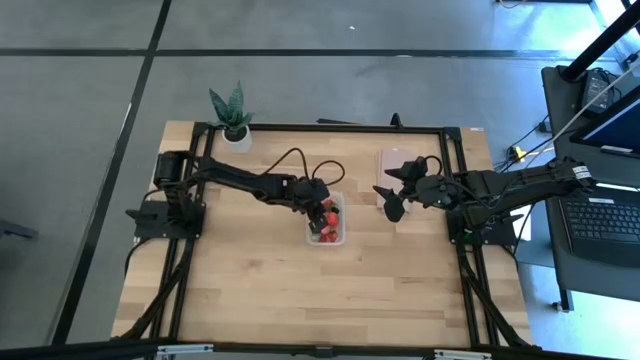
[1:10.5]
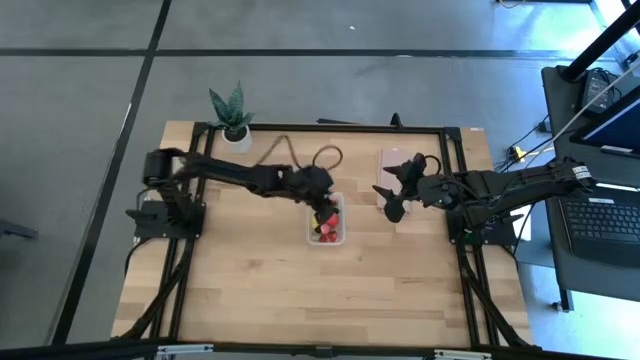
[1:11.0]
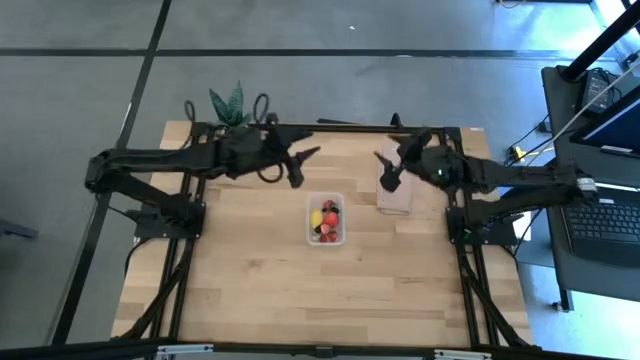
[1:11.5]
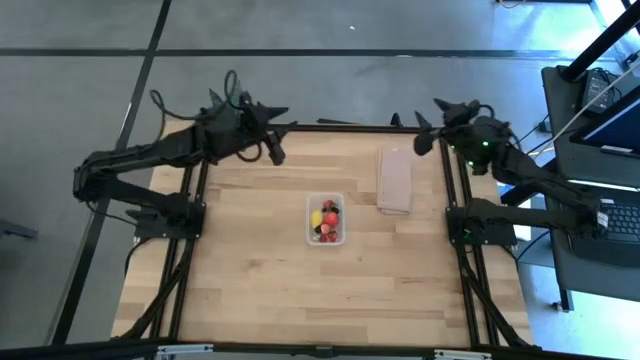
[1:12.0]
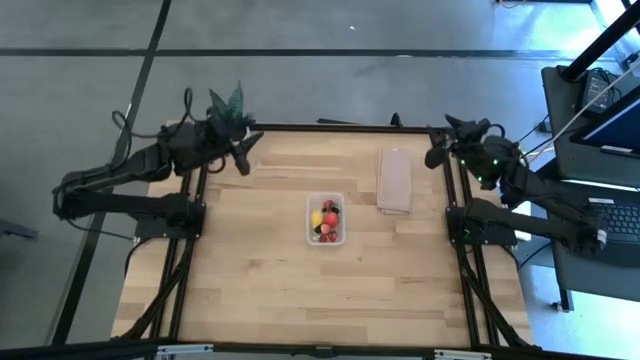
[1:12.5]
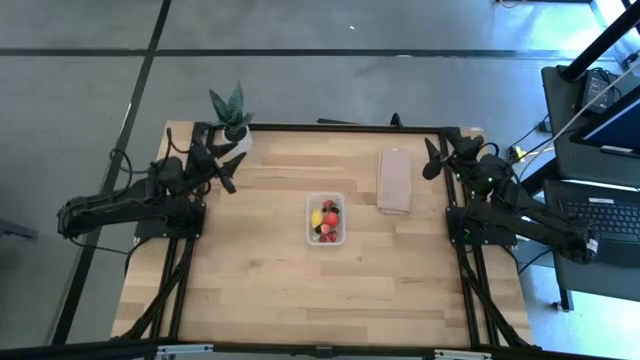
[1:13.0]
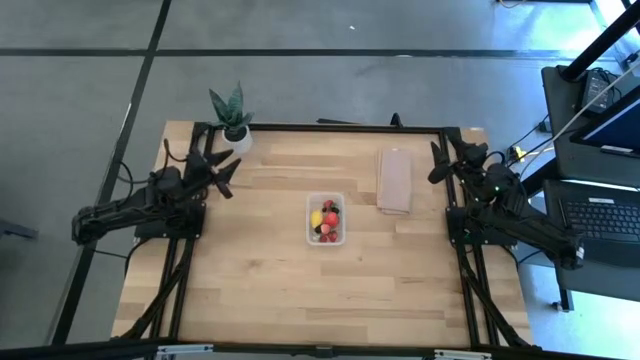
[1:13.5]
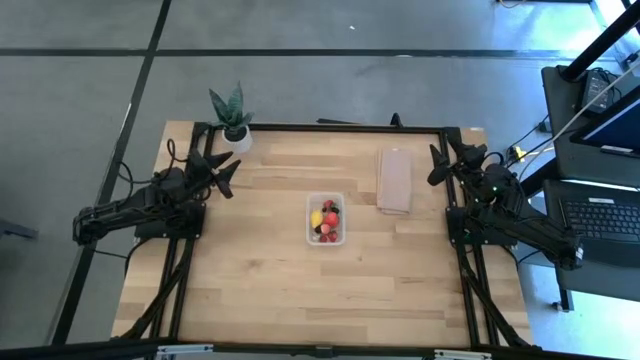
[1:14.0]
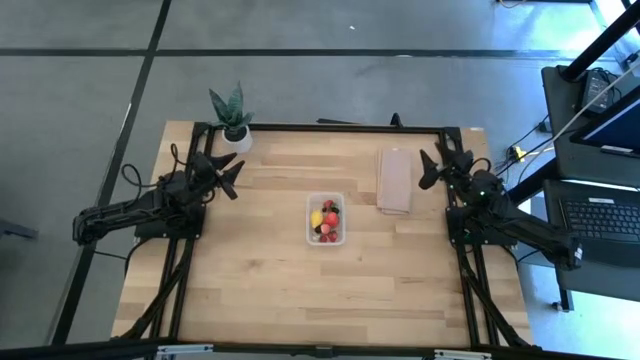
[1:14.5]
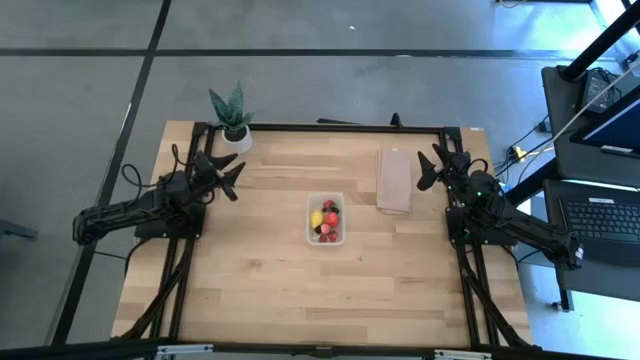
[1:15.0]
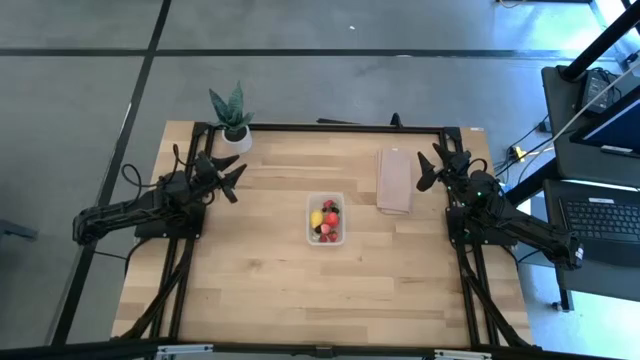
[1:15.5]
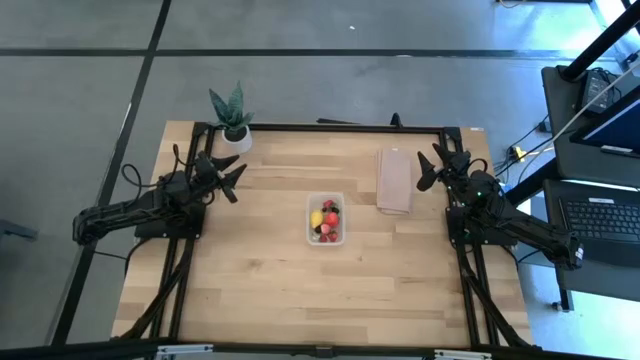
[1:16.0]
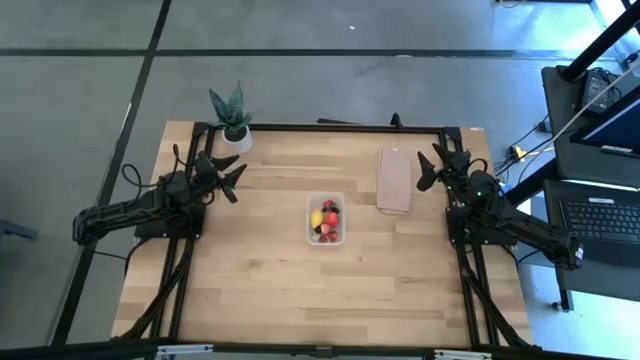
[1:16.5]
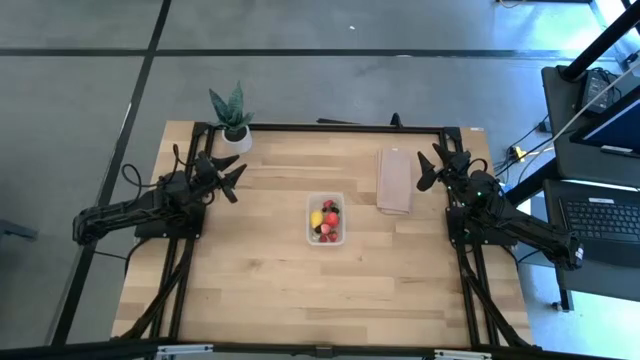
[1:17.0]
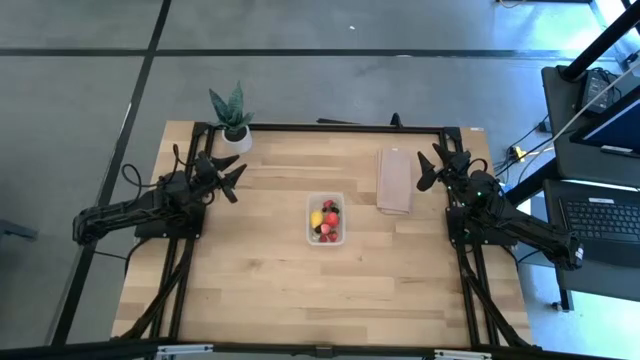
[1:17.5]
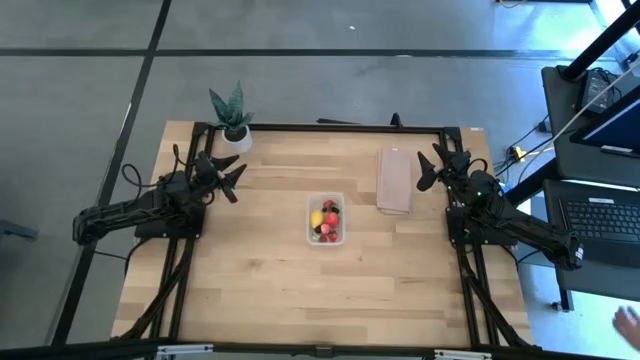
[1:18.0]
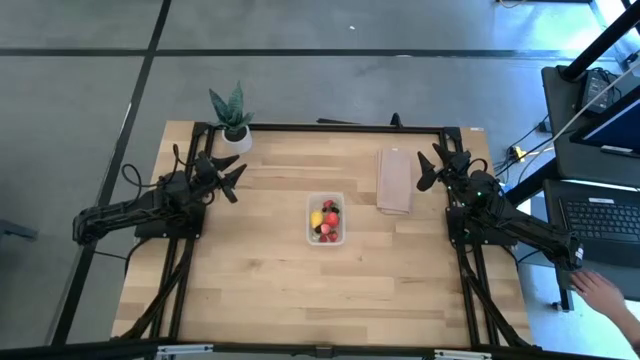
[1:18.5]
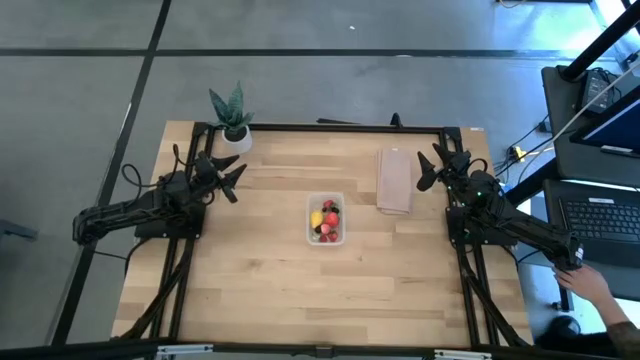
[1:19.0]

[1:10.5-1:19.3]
Task: Pick and placing Produce into tupperware
Return to Home Position

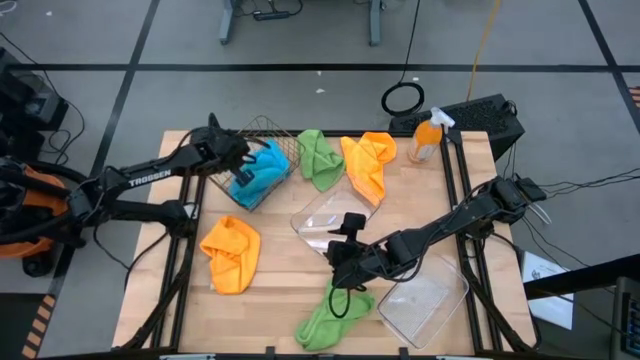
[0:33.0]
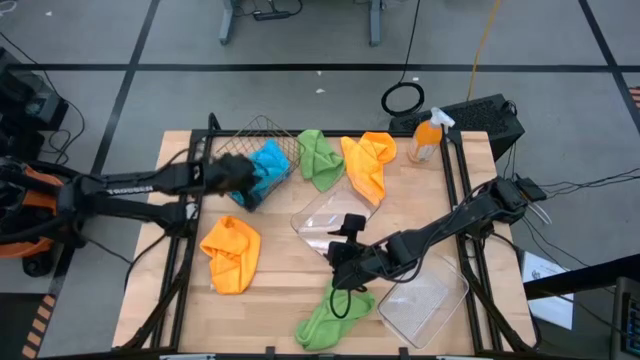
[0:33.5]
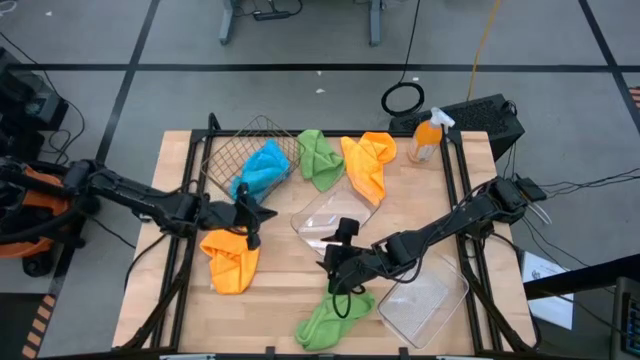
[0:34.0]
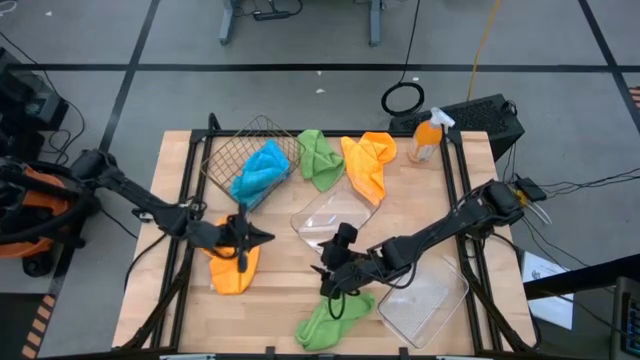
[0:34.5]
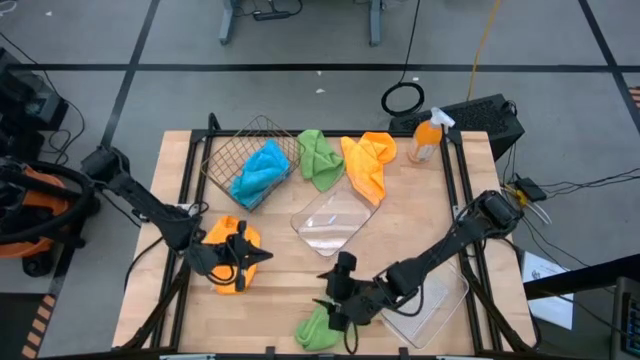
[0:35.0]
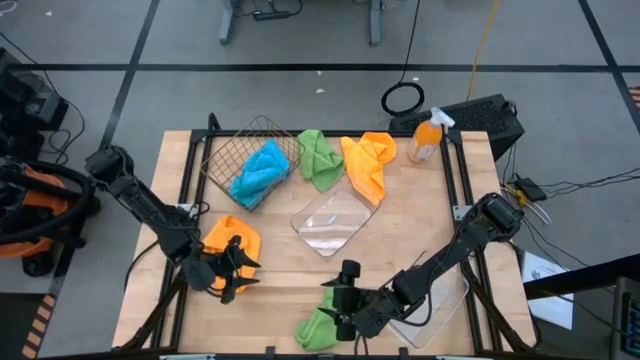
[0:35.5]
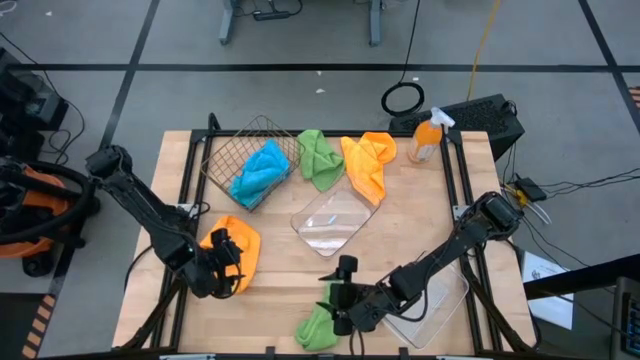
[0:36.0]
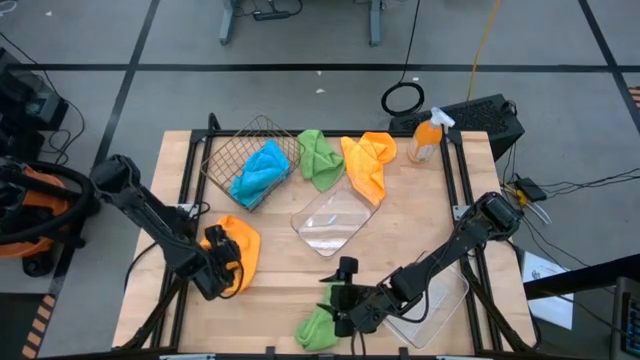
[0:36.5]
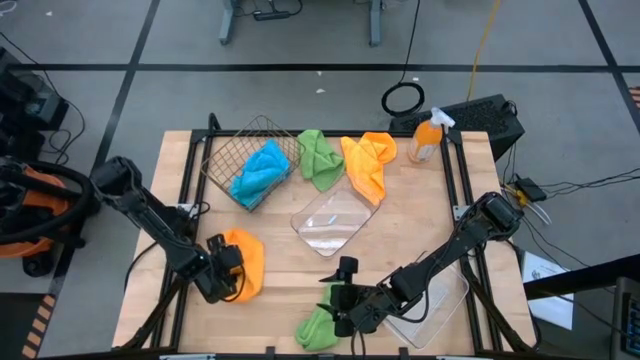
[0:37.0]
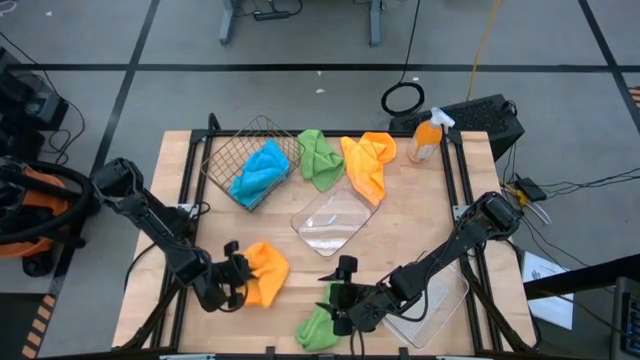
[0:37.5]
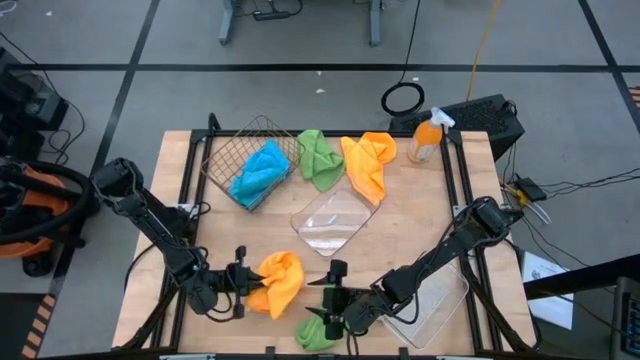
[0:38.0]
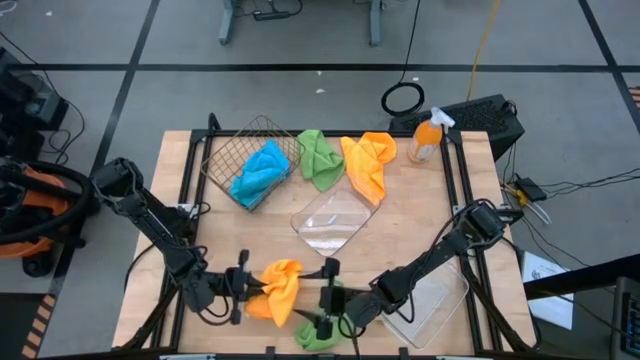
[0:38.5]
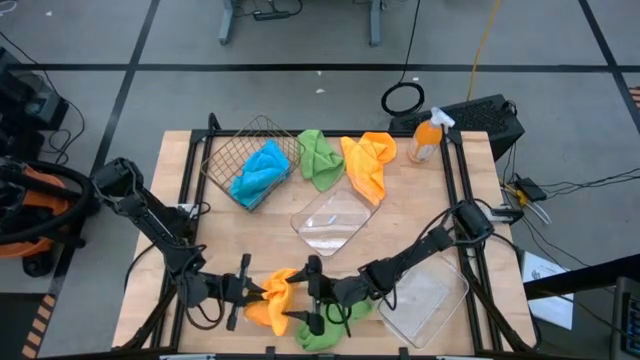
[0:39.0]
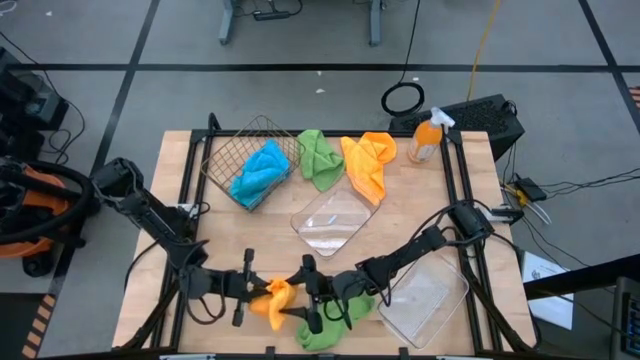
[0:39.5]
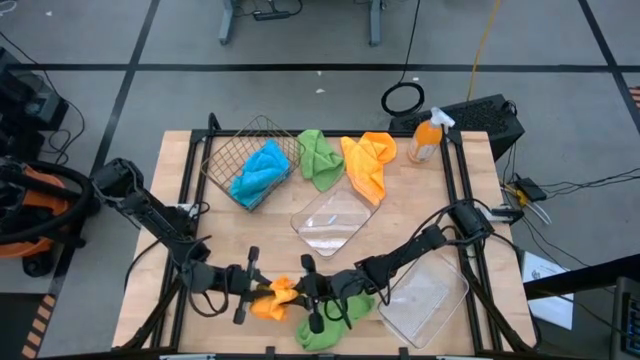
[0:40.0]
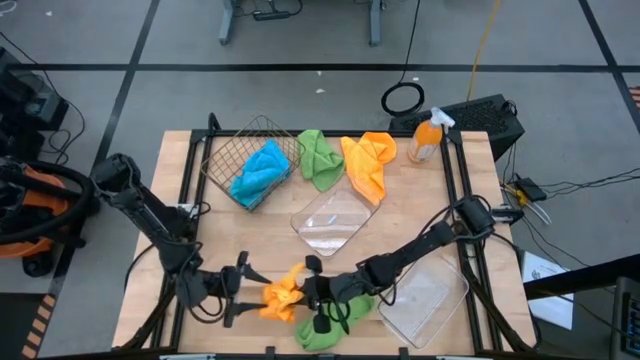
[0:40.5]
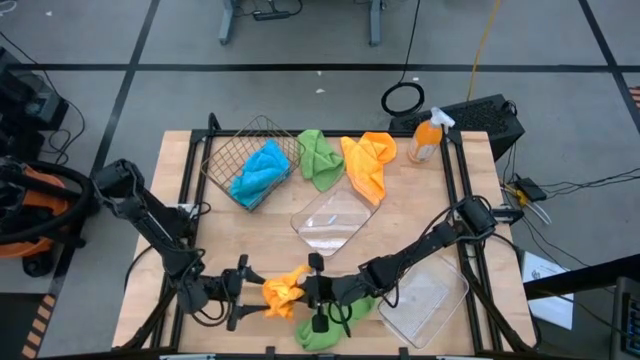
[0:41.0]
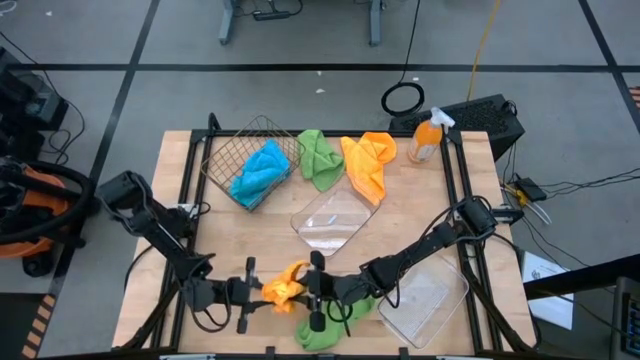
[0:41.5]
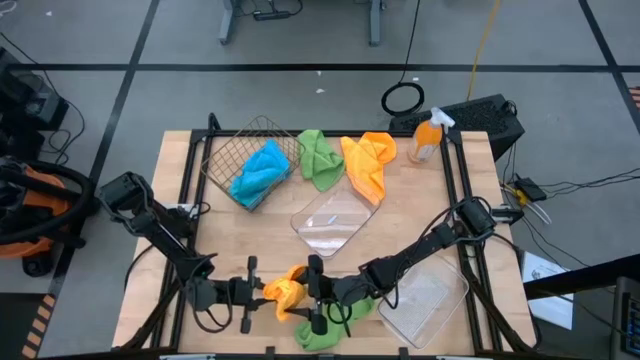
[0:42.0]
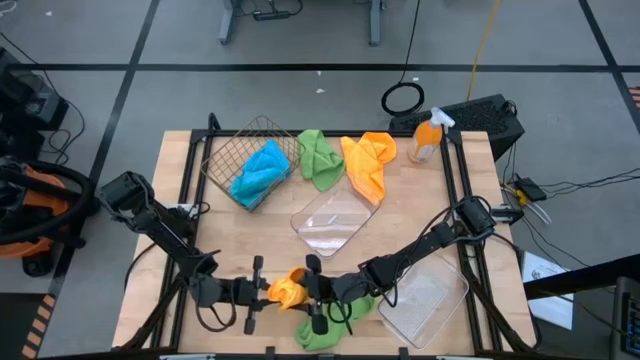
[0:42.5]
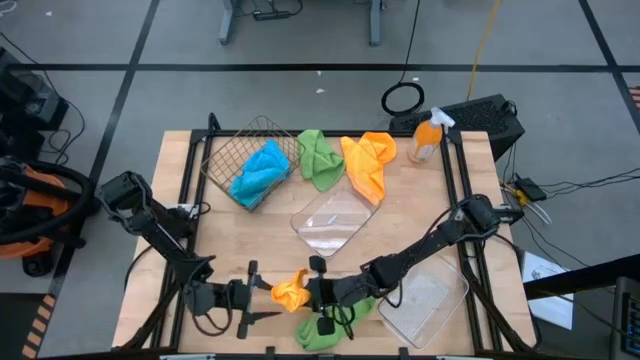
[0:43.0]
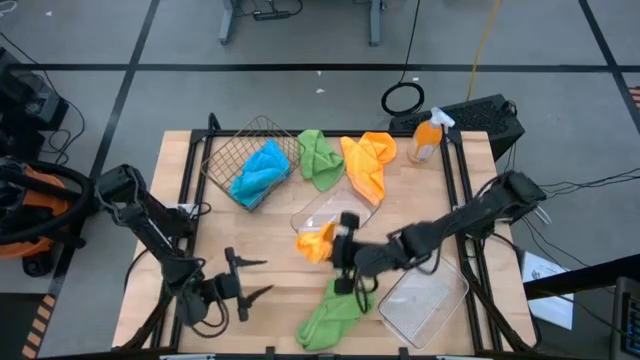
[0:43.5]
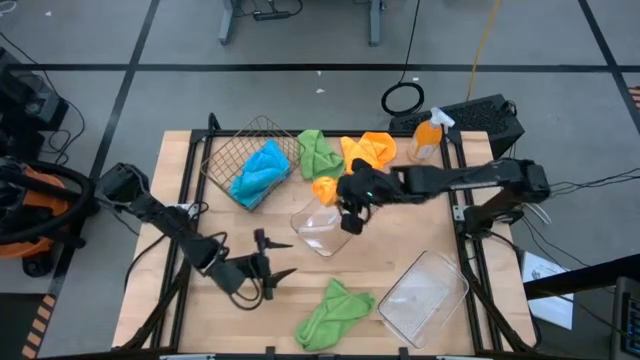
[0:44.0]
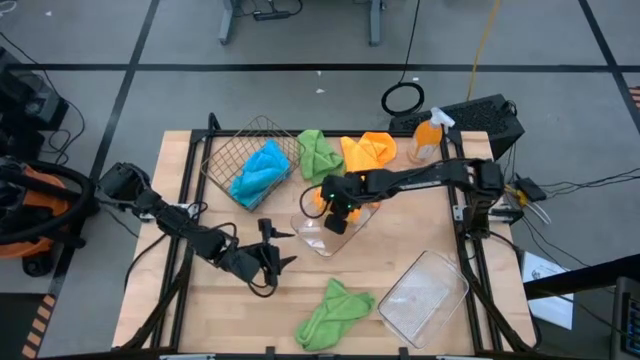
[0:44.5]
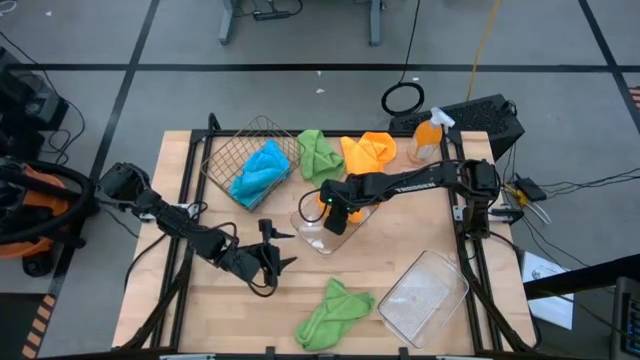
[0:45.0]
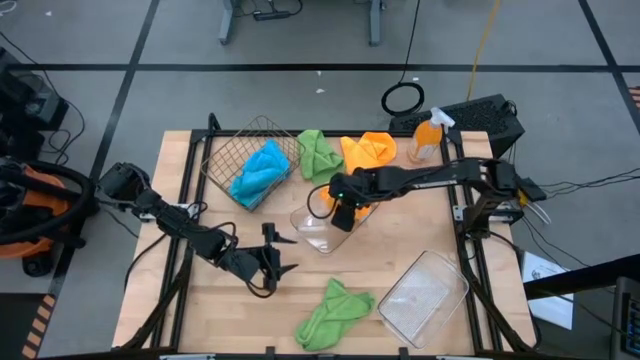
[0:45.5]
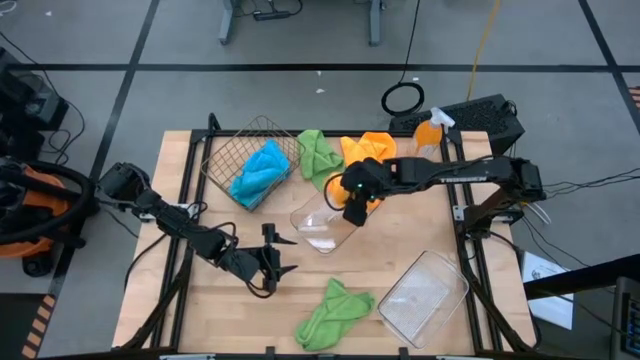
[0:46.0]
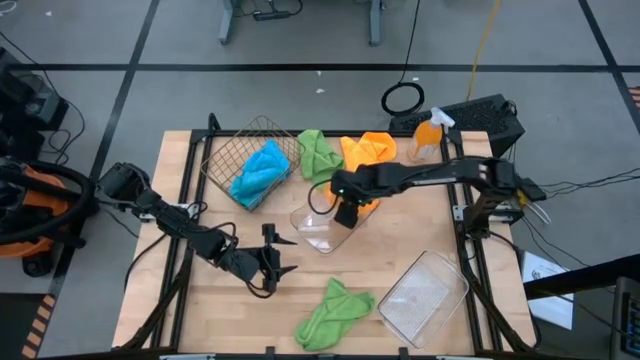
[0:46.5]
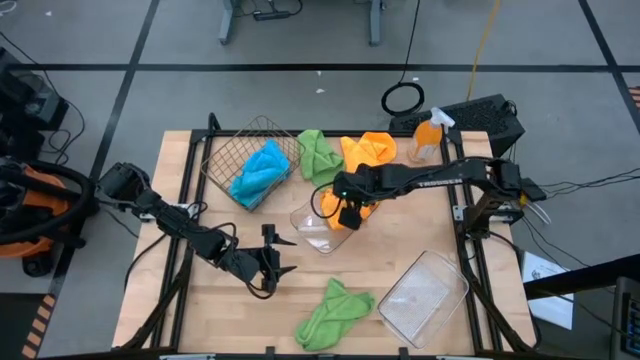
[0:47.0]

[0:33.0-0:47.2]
Task: Sort microfiber towel by color & place in baskets
Put the bottom yellow towel into the top transparent bin
